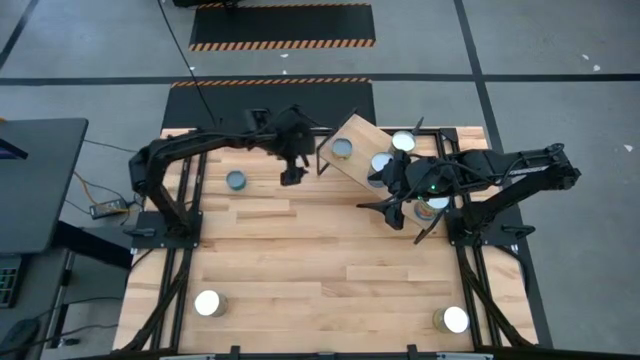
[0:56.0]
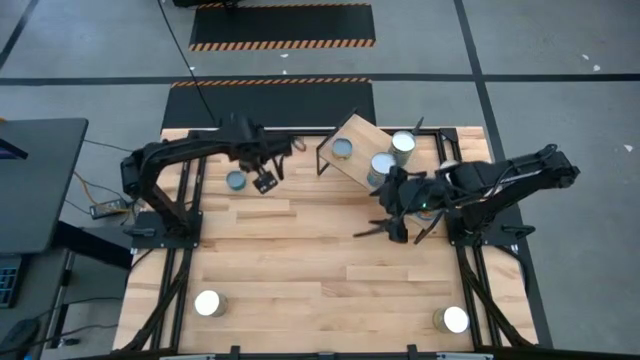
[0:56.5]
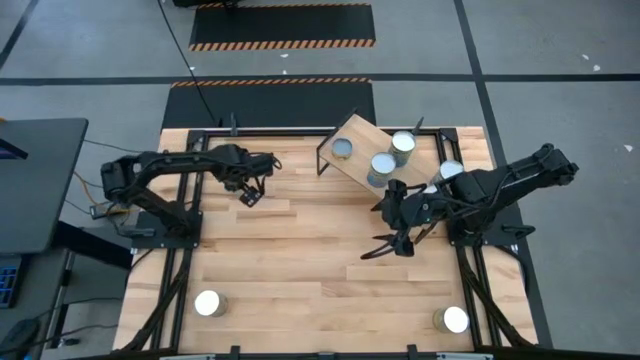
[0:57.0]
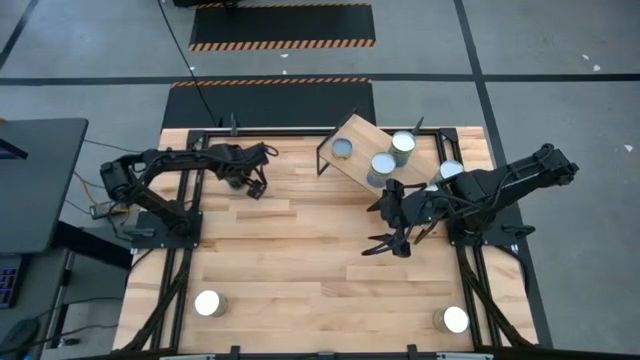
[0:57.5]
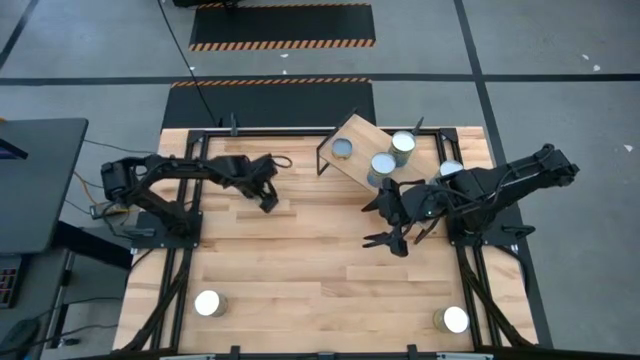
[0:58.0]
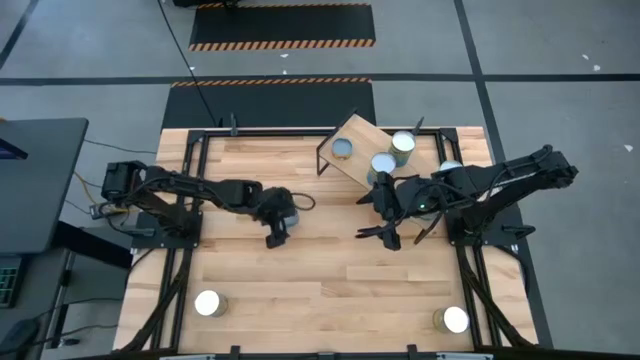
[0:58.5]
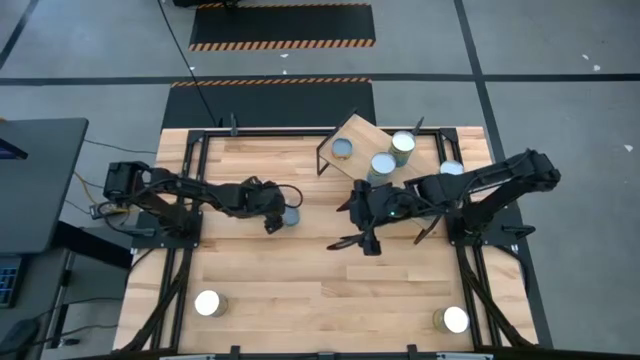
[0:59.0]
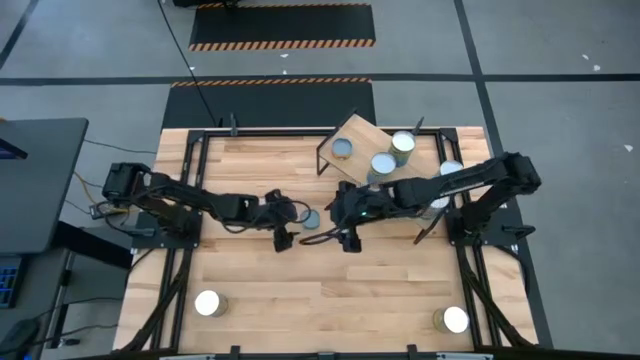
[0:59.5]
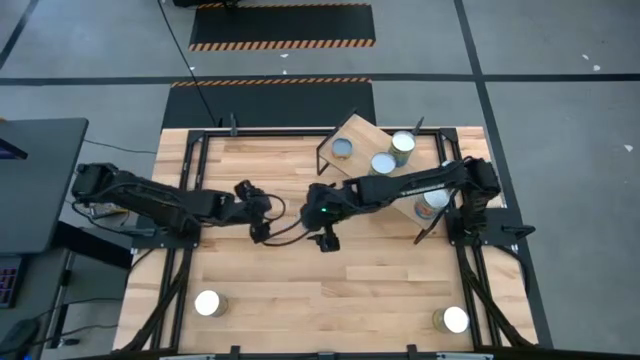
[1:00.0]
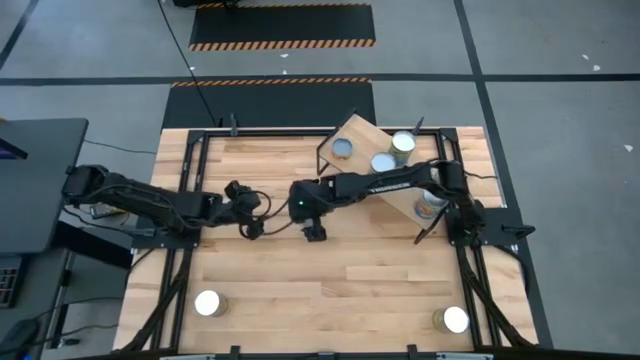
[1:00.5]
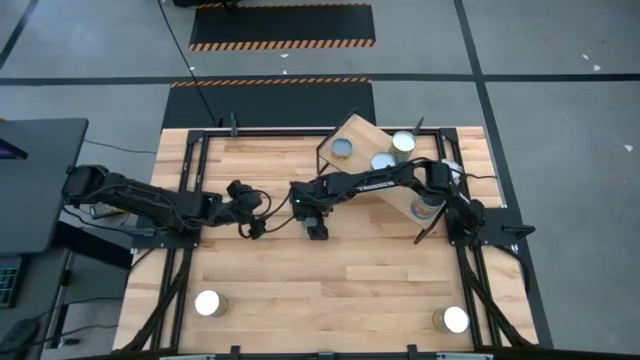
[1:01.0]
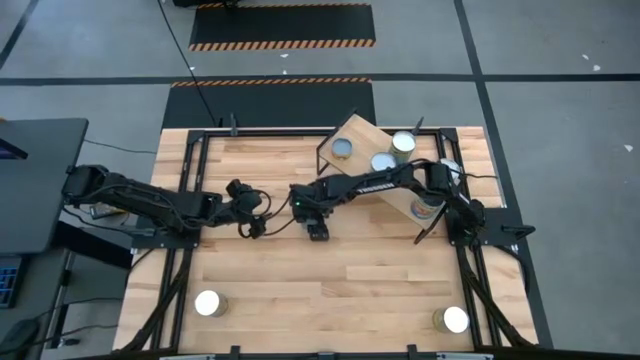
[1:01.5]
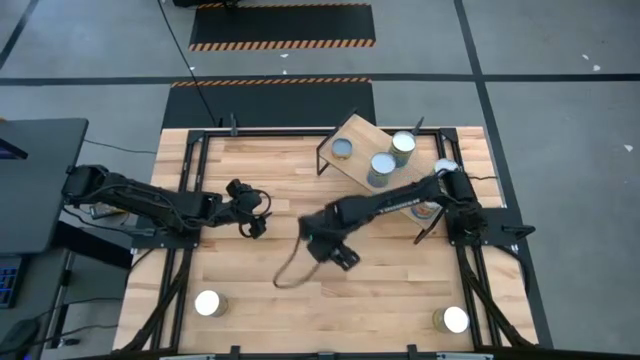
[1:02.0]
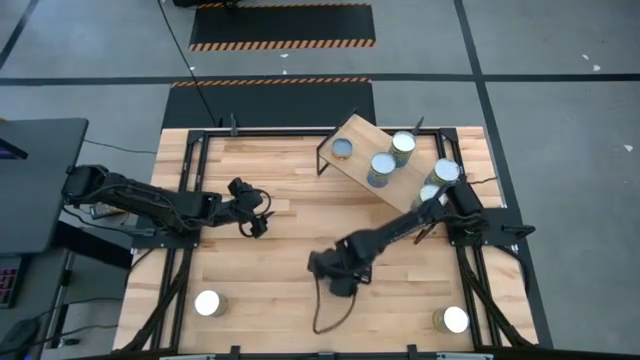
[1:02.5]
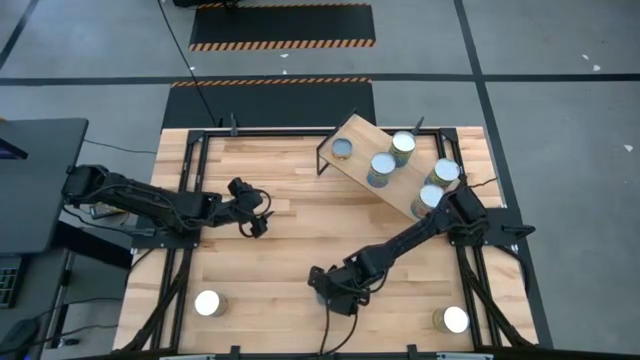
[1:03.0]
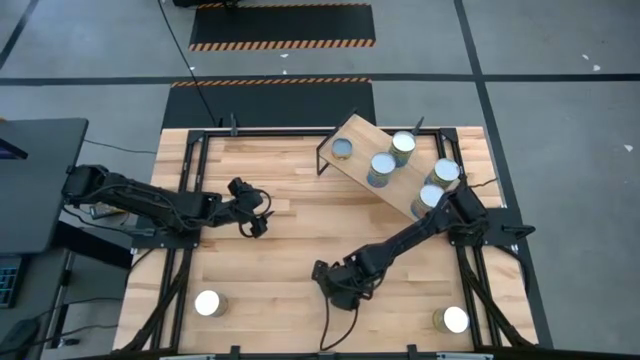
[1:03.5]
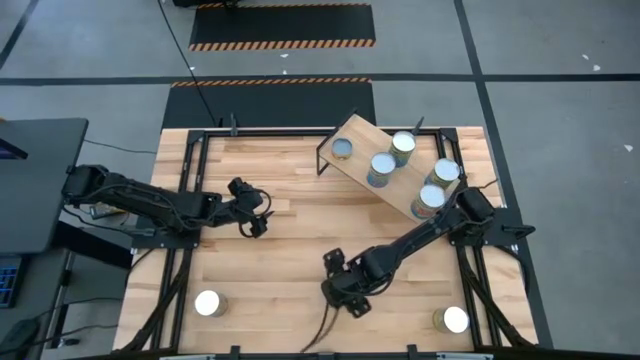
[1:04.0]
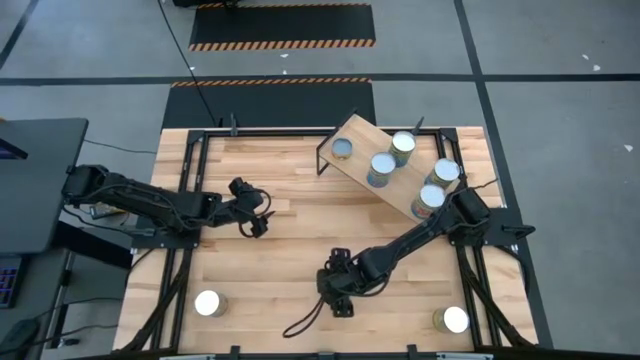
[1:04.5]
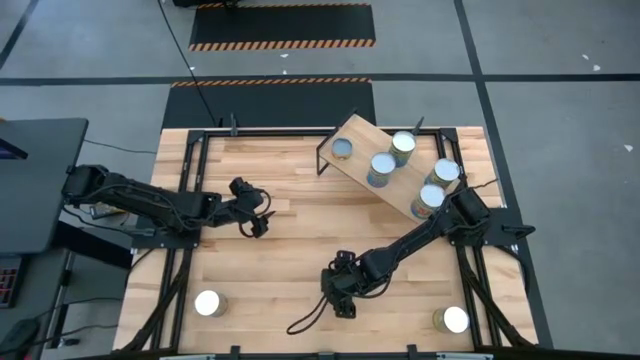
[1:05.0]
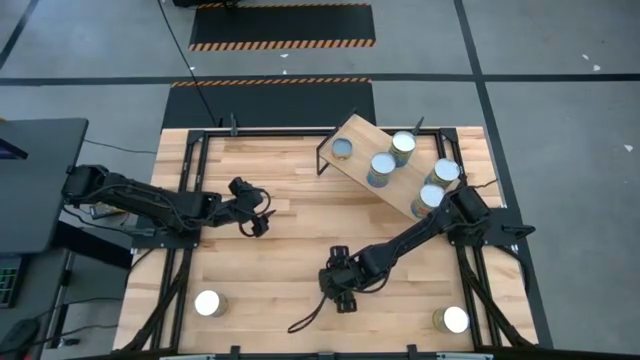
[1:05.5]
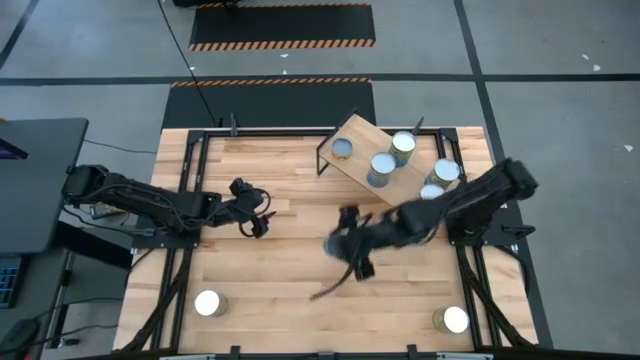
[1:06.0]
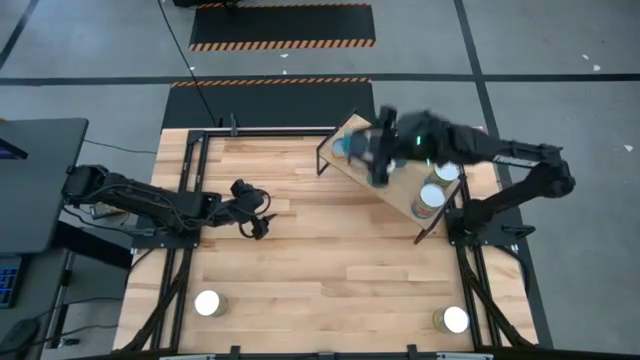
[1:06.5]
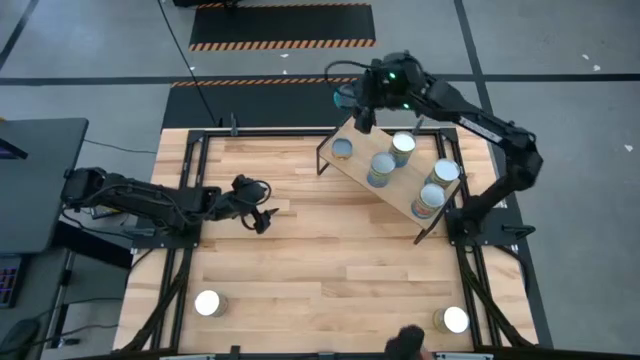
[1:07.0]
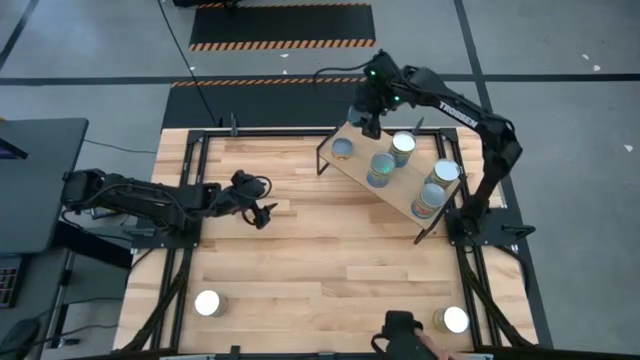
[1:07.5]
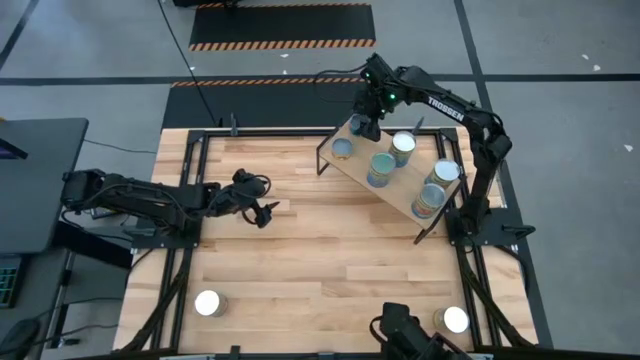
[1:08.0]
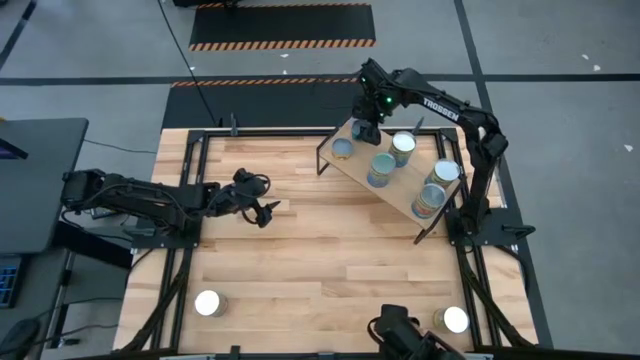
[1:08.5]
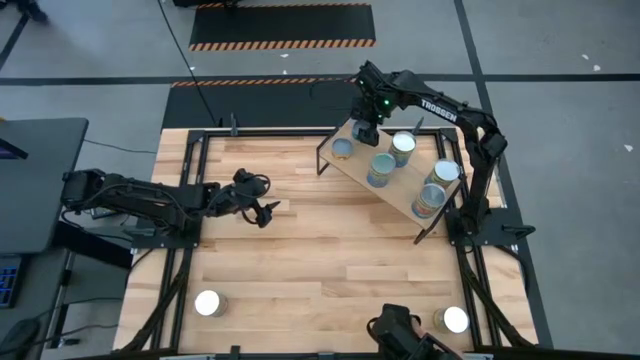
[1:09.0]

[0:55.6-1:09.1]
Task: Pick and place cans onto a shelf
Put the canned tuna on the shelf

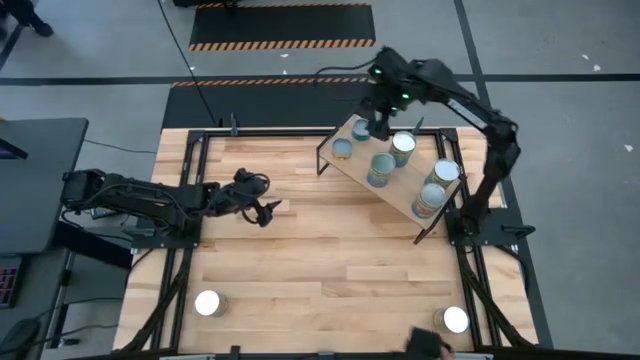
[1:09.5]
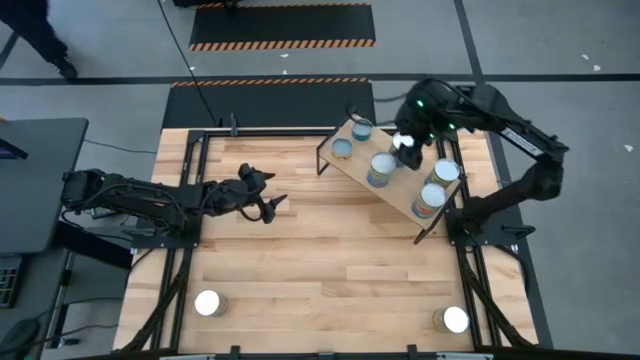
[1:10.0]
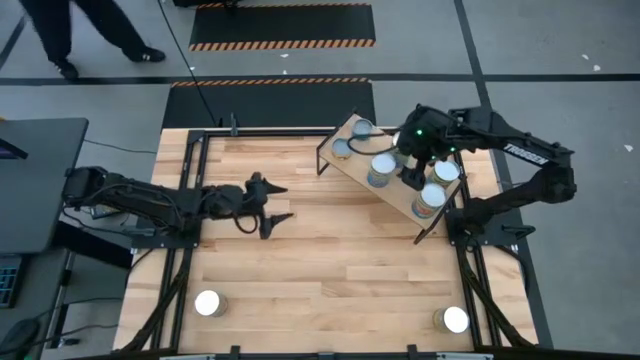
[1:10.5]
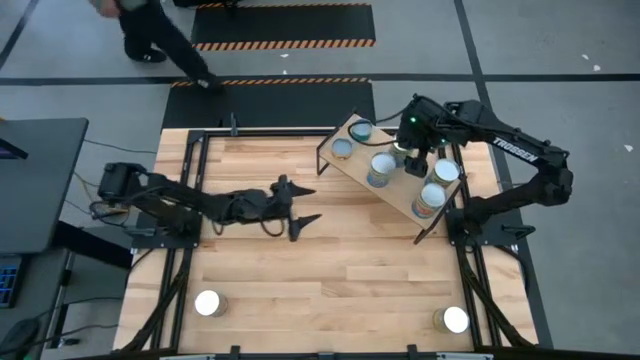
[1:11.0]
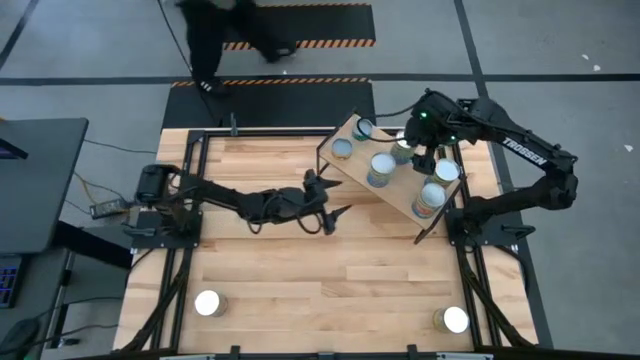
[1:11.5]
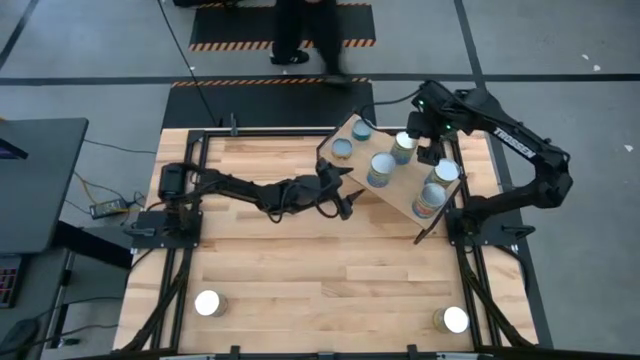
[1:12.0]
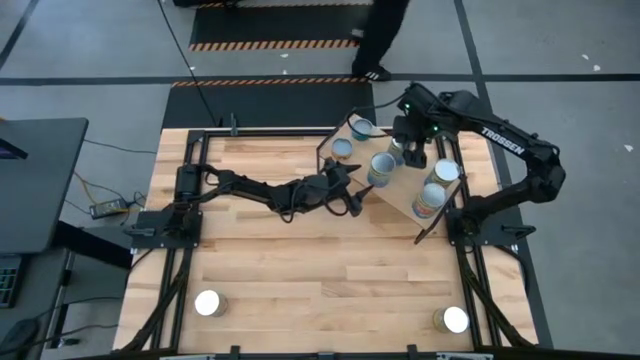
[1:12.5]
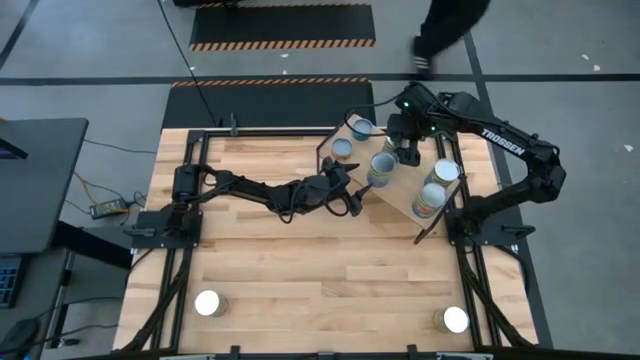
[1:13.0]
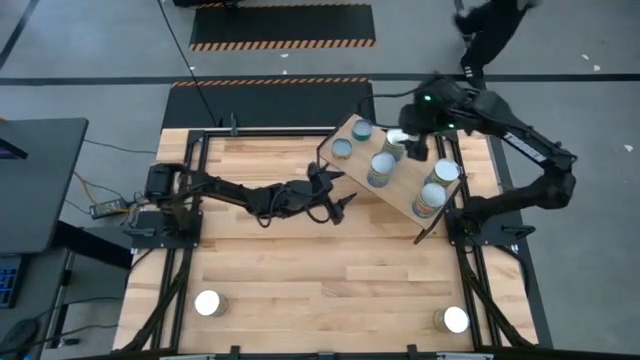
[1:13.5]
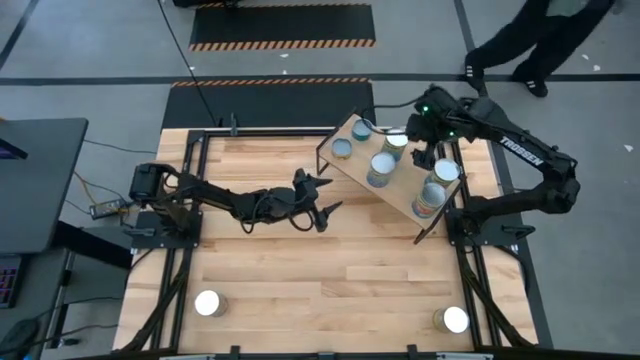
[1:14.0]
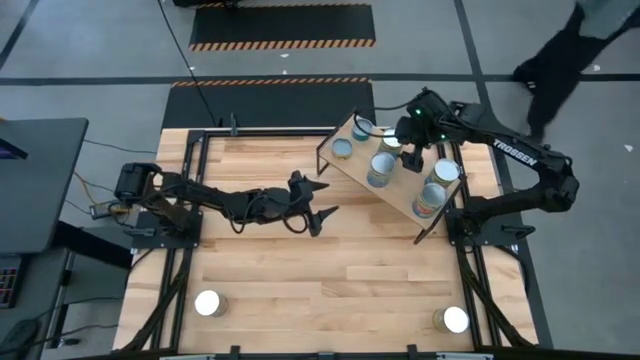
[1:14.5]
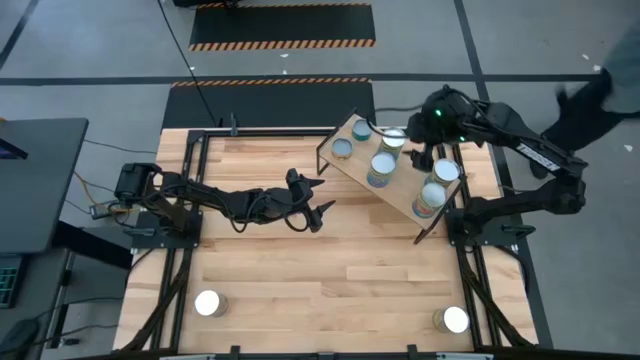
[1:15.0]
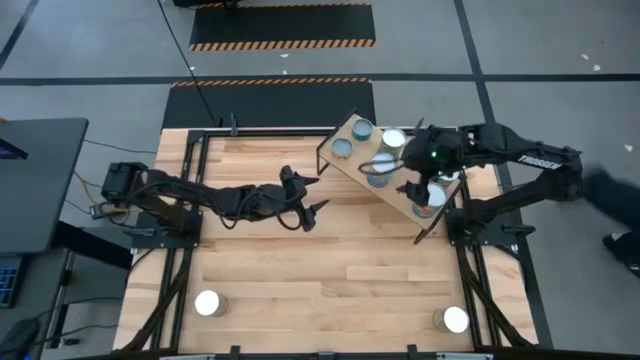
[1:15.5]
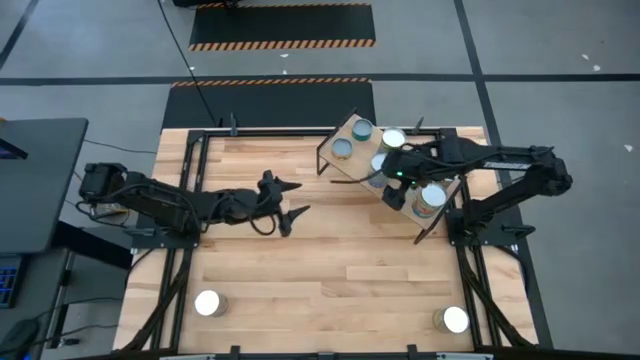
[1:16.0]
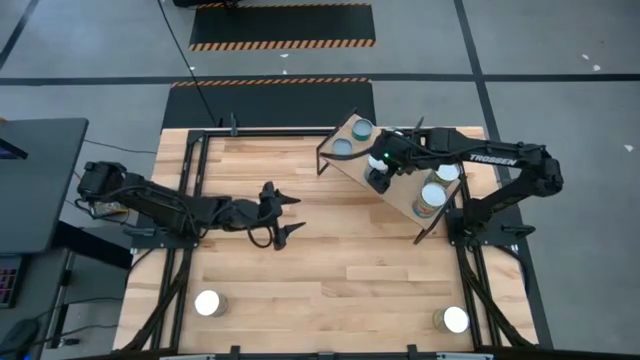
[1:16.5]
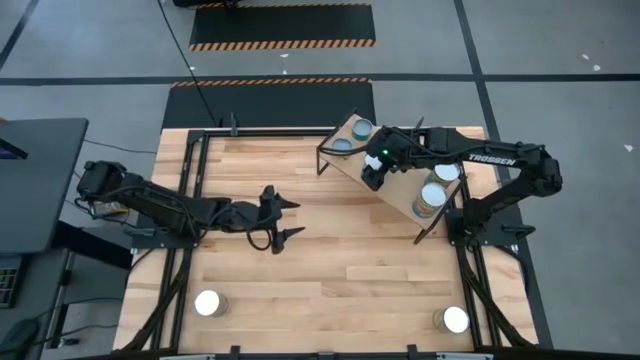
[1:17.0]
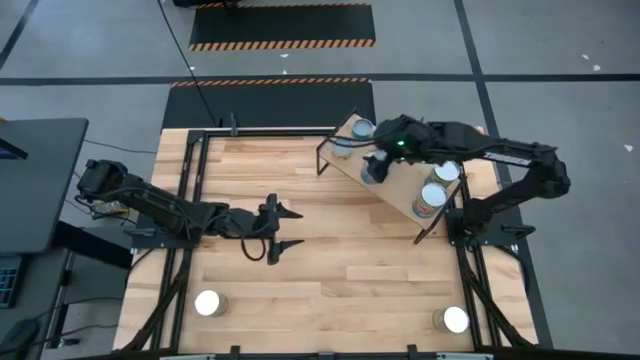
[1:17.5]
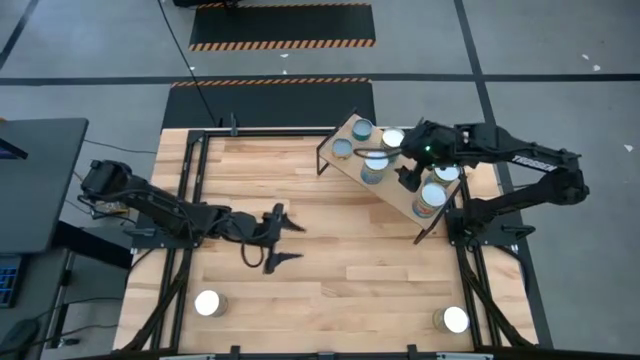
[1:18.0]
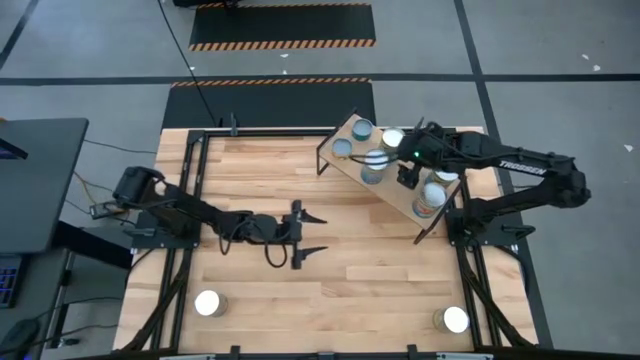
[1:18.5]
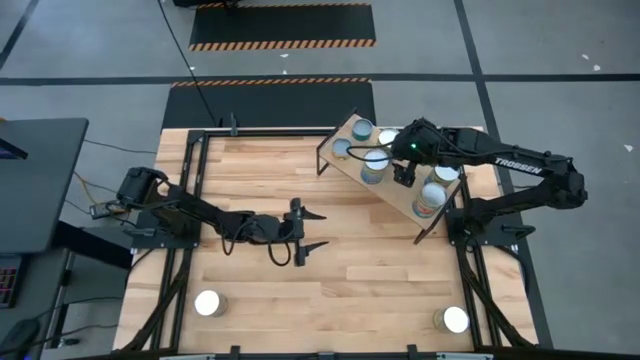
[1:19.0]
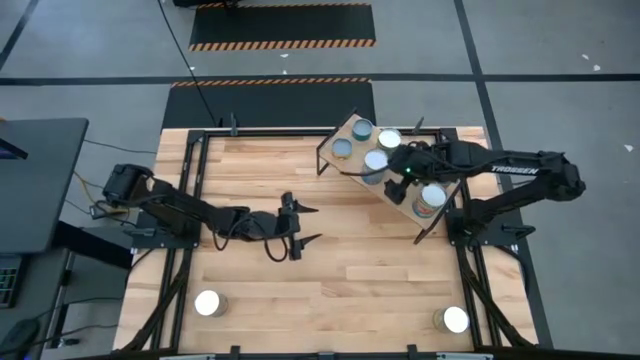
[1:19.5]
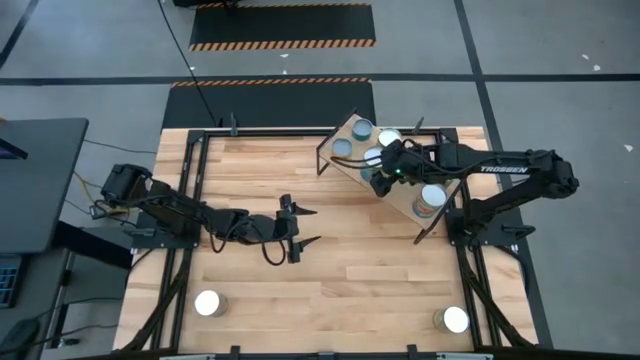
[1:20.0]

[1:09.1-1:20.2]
Adjust the canned cherries on the shelf
